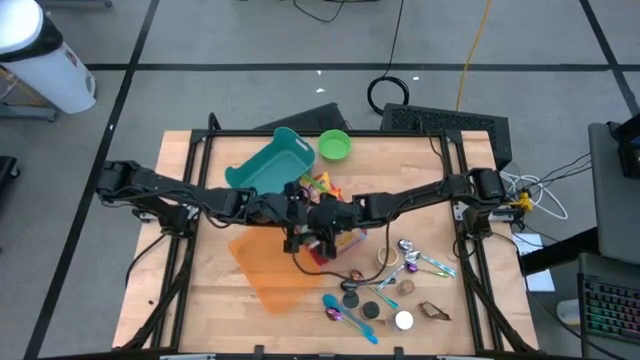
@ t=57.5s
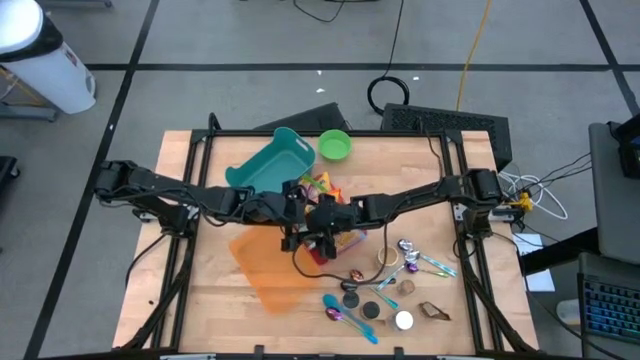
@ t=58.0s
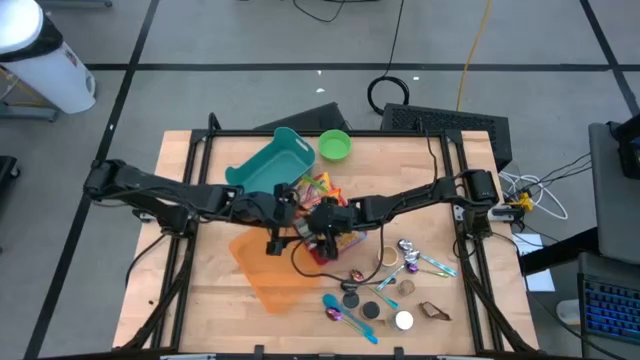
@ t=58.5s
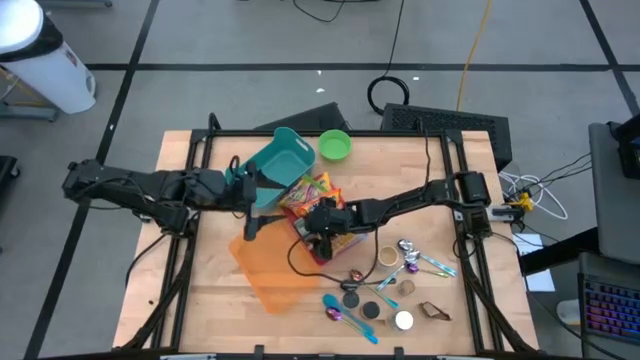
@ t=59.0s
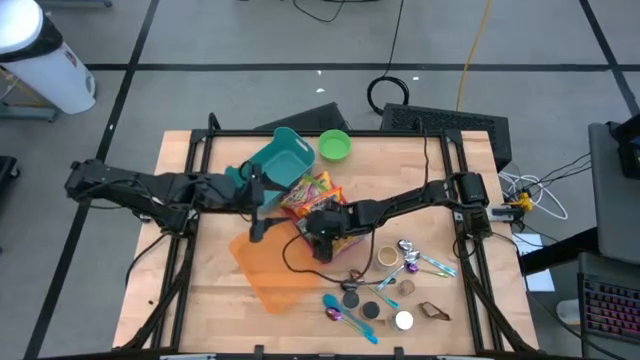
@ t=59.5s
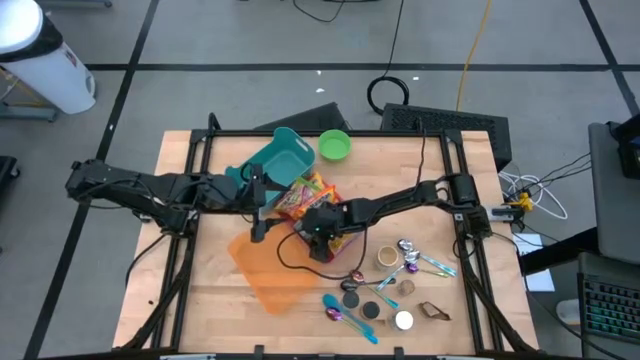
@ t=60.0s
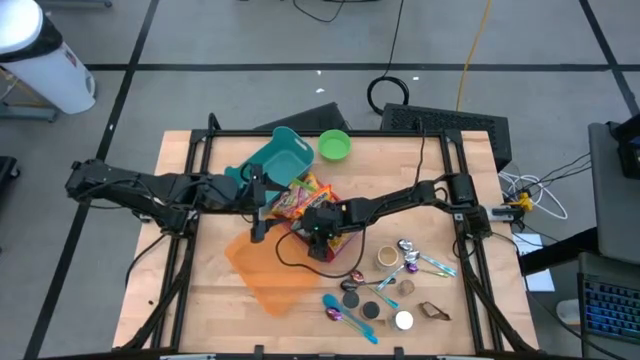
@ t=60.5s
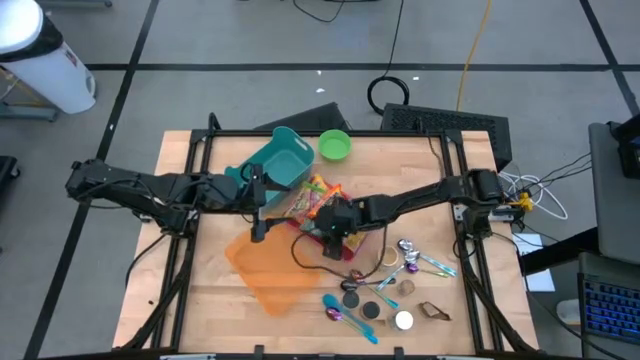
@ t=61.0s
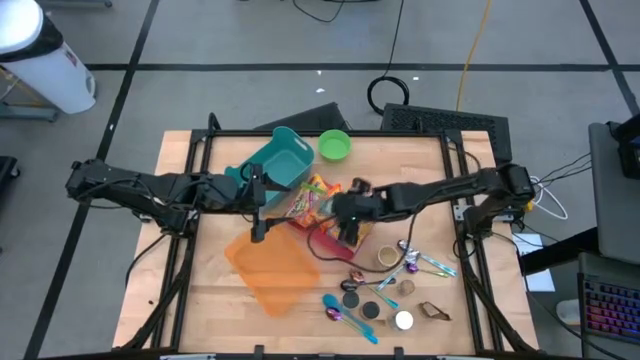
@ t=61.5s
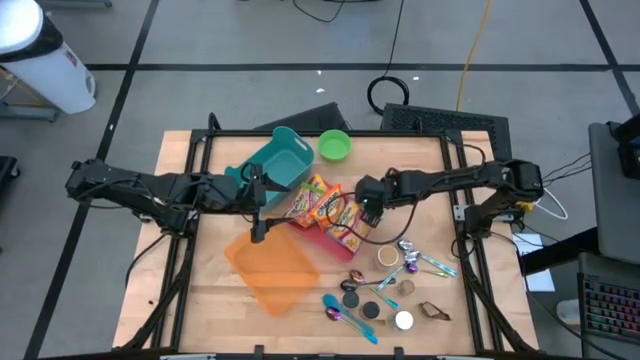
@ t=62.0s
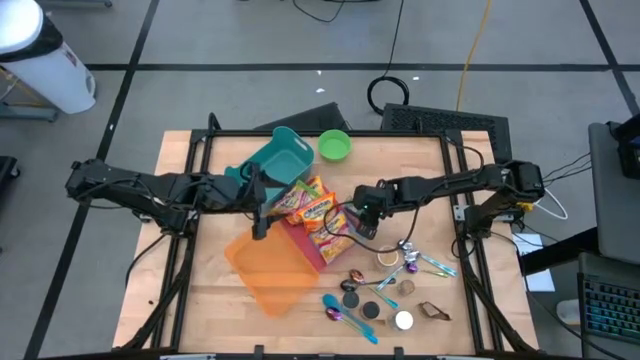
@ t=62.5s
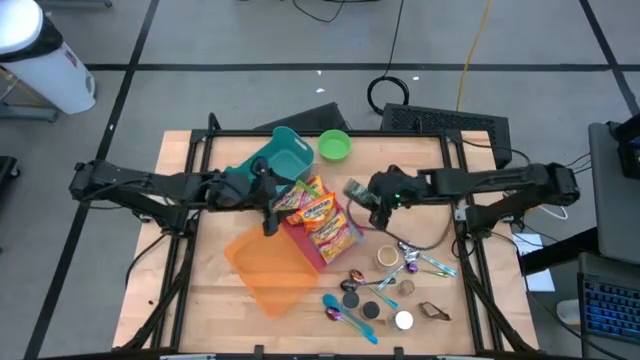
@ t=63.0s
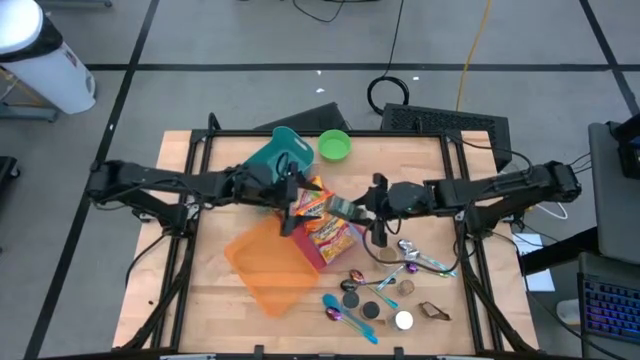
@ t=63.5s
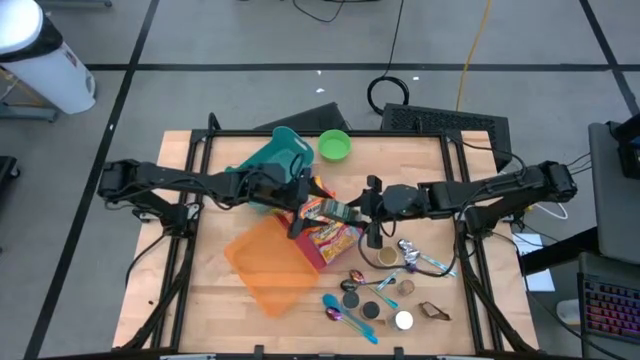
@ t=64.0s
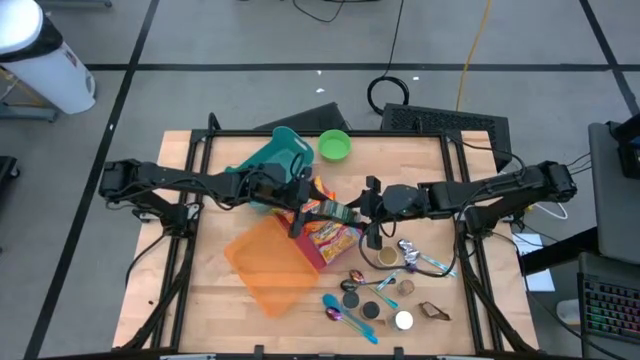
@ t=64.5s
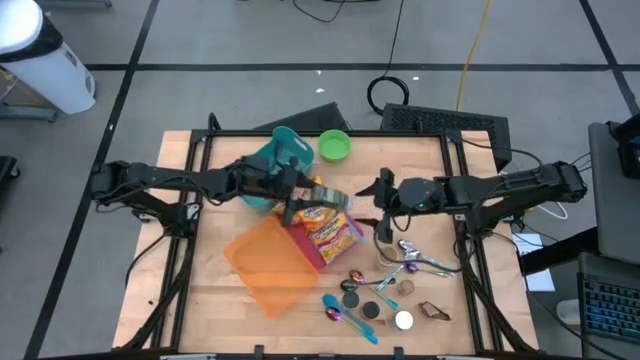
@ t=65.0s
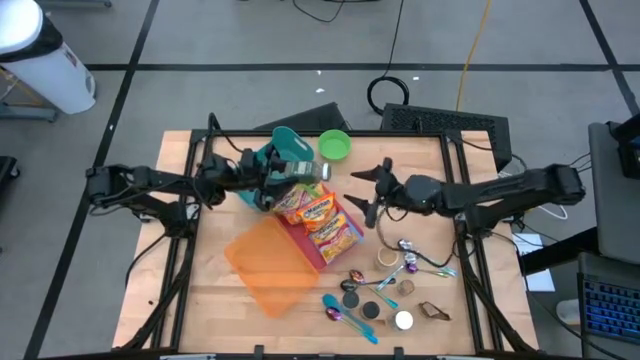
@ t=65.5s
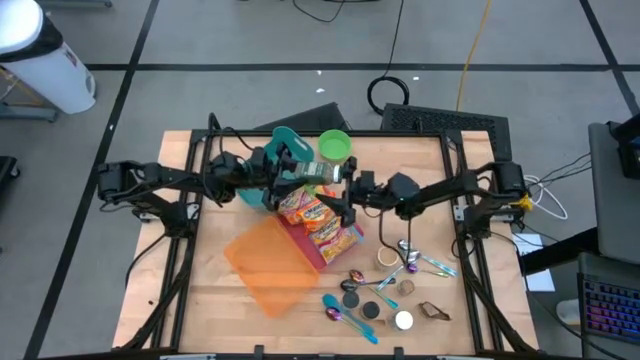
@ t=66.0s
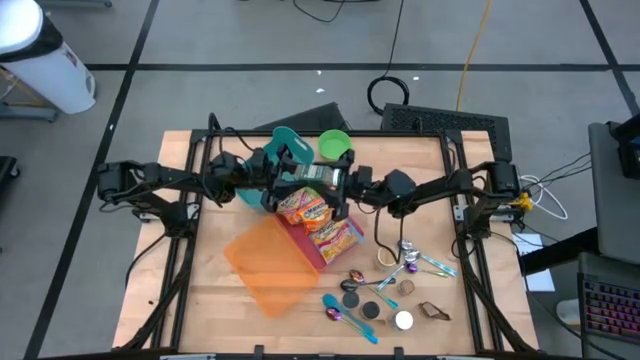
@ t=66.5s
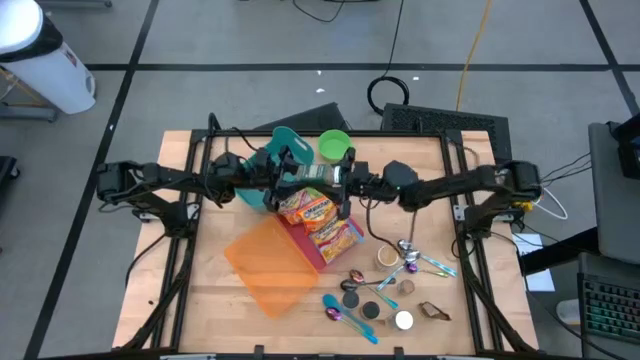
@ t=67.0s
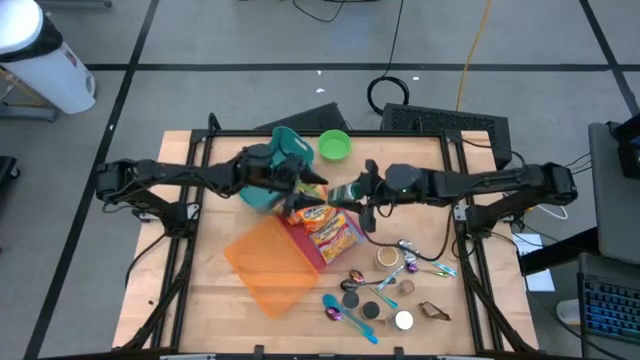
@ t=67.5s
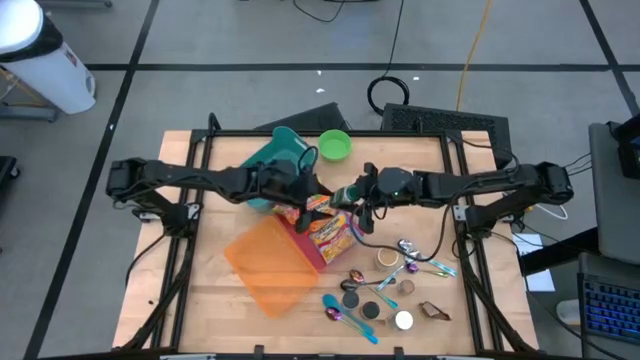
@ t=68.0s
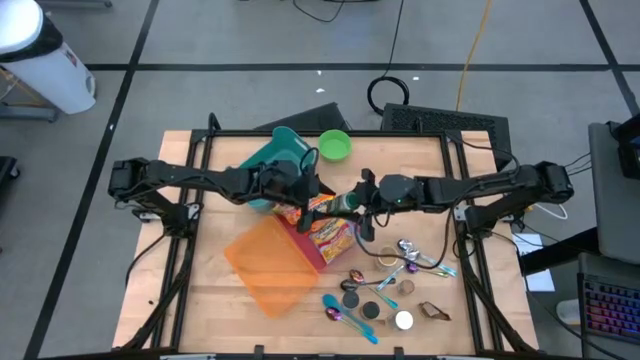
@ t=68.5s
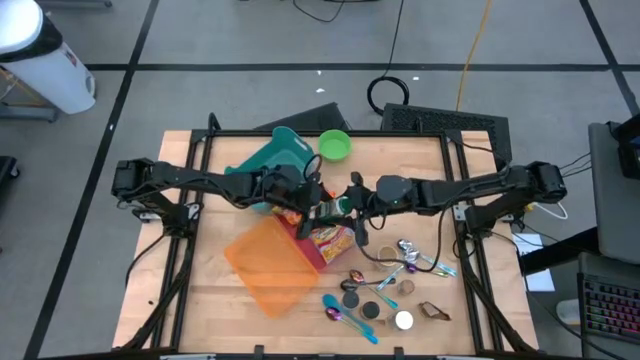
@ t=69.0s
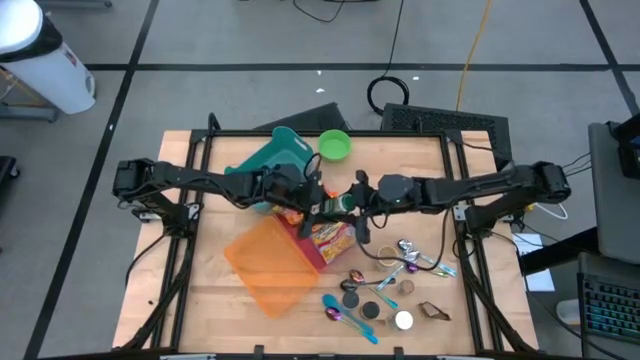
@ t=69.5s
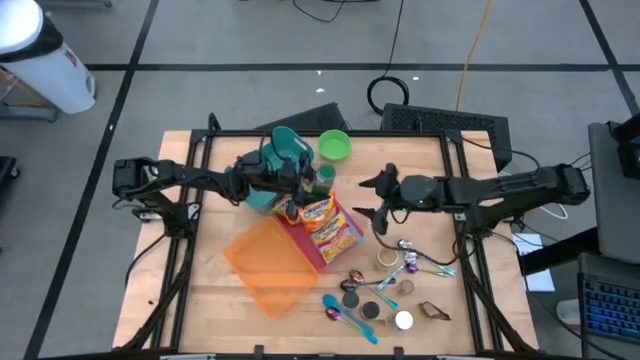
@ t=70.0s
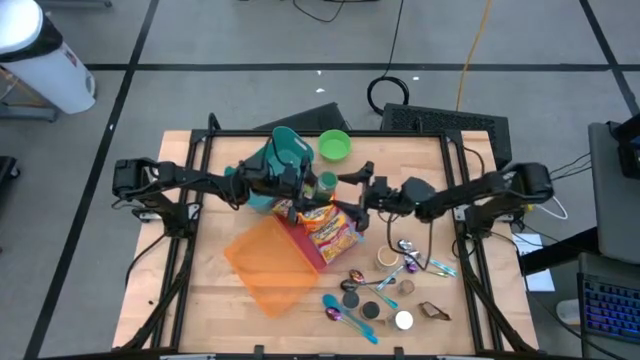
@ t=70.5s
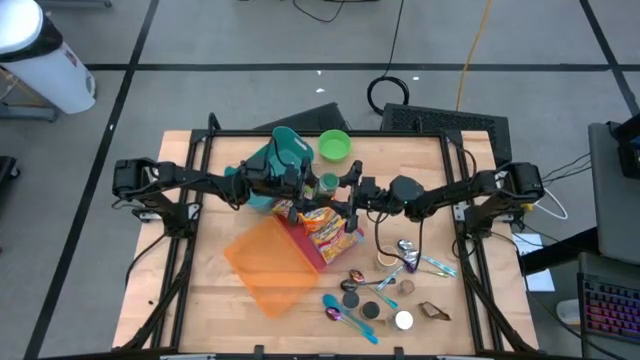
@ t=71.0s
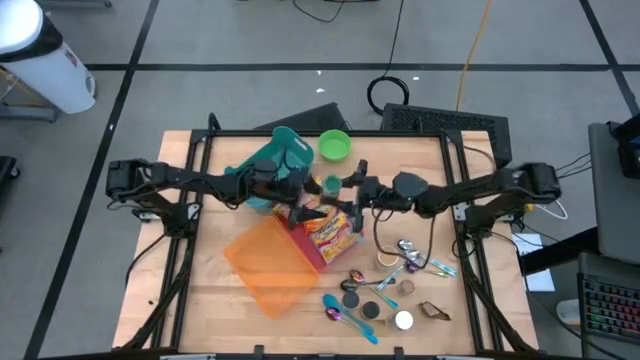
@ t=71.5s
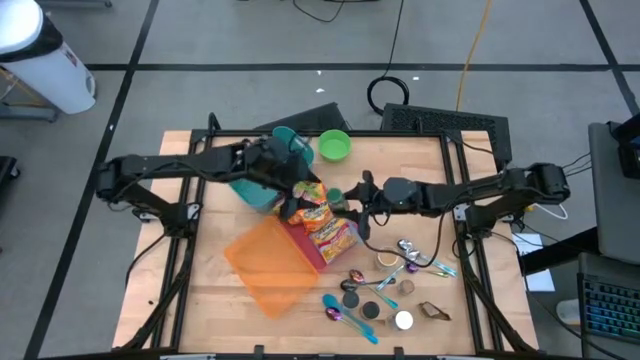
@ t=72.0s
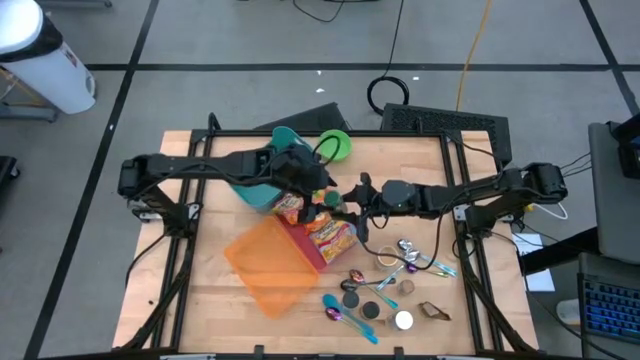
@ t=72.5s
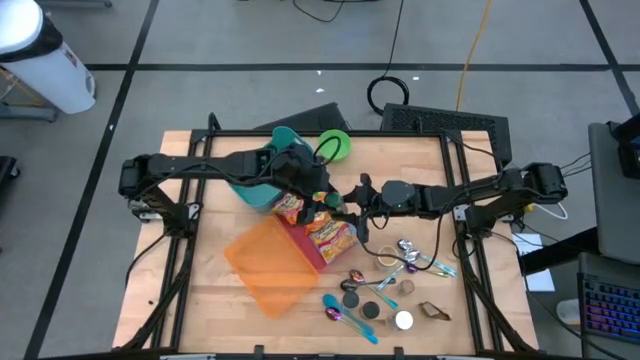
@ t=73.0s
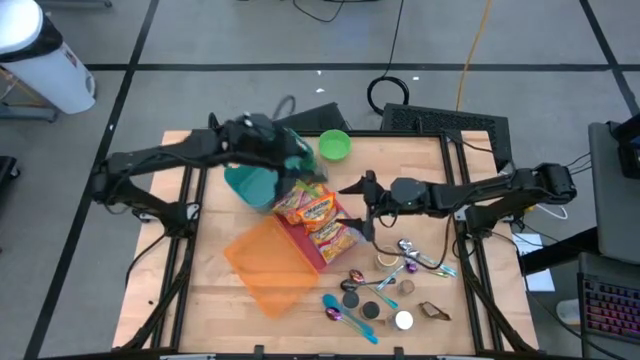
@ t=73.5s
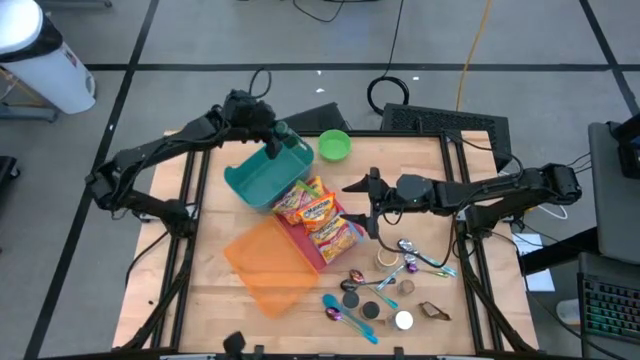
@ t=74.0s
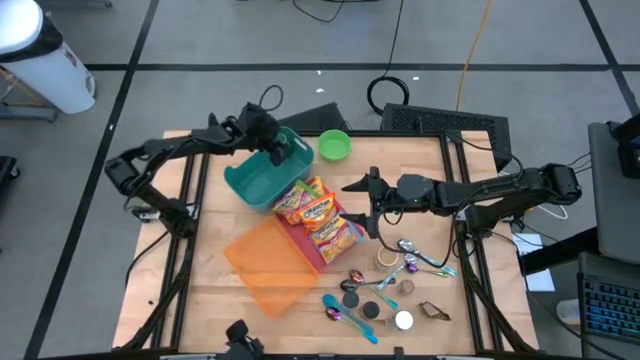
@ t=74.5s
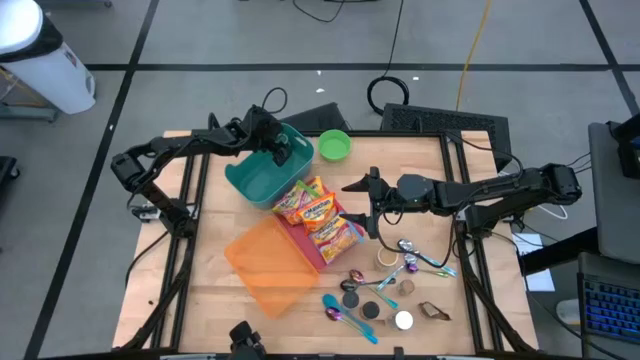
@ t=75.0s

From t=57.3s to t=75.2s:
Task: Pick & Place Food Item
Put the green seasoning bottle into the green bin
